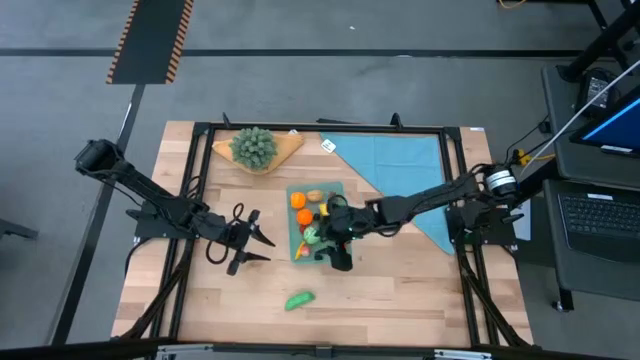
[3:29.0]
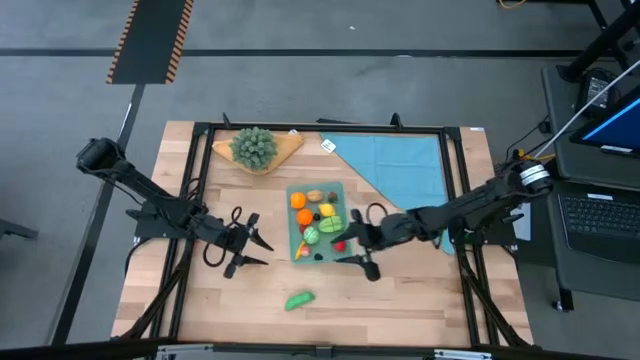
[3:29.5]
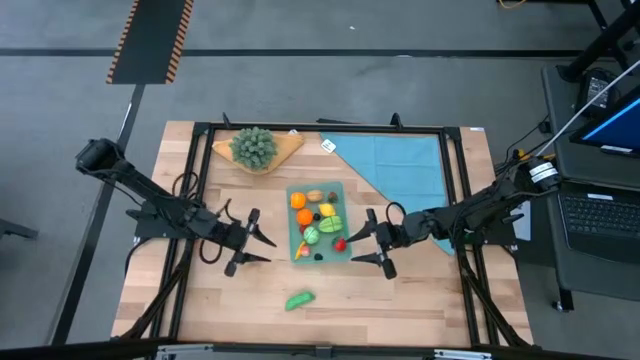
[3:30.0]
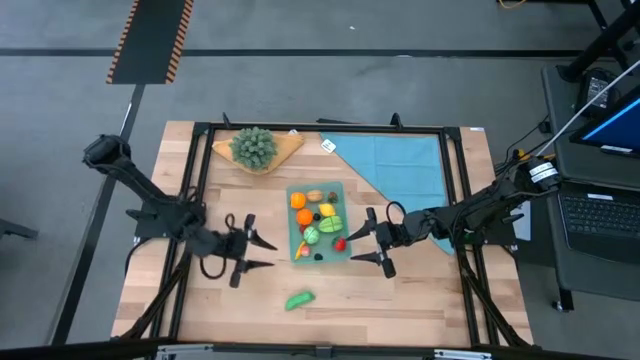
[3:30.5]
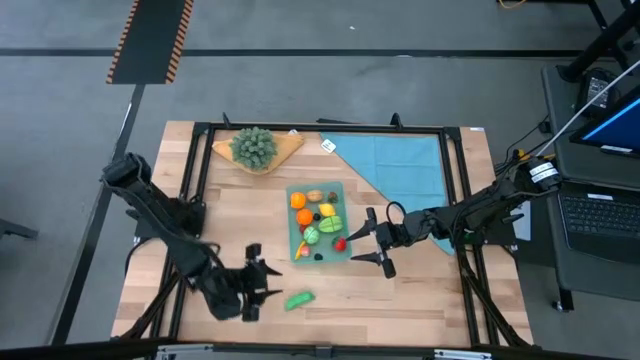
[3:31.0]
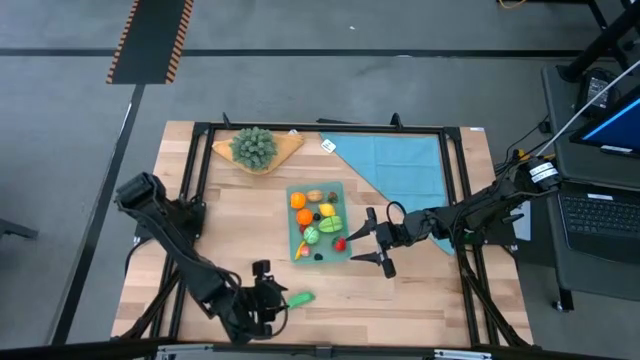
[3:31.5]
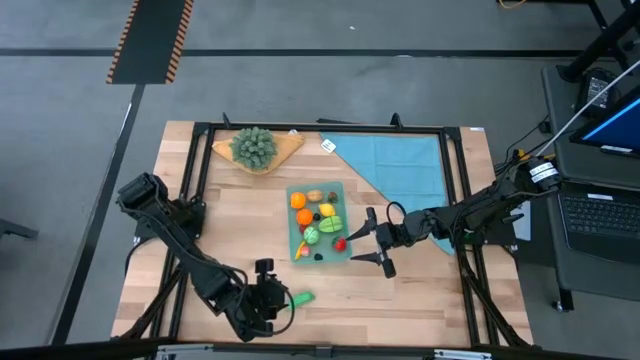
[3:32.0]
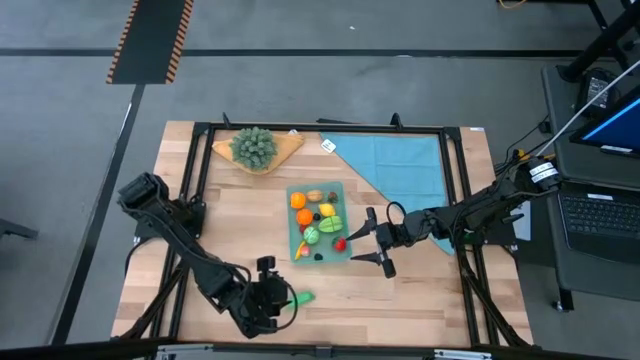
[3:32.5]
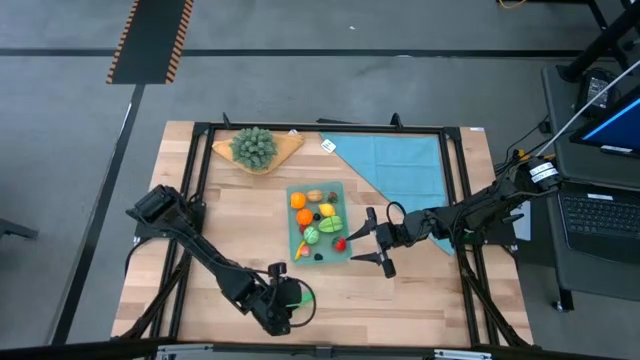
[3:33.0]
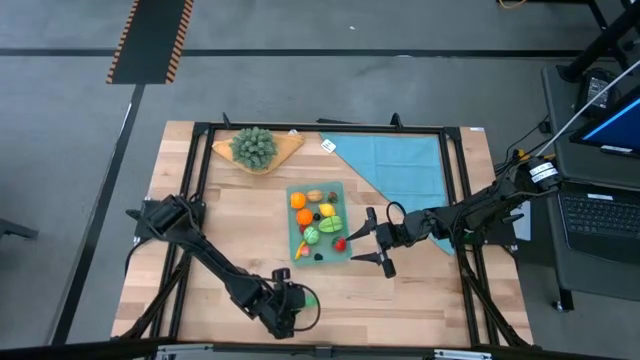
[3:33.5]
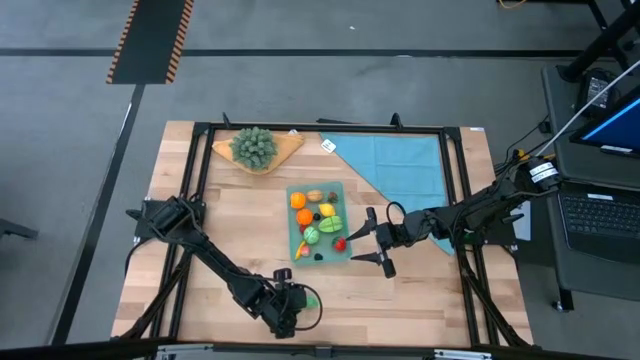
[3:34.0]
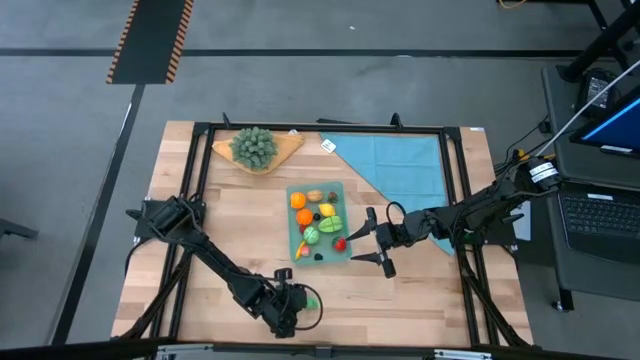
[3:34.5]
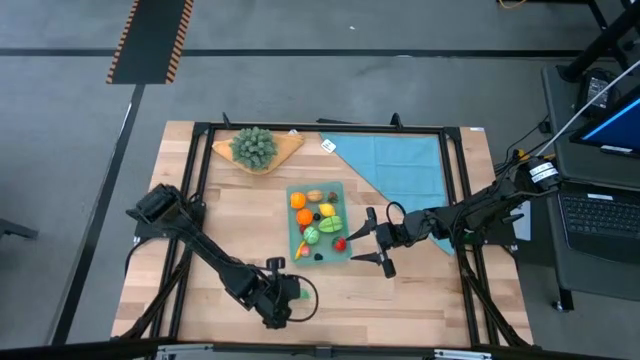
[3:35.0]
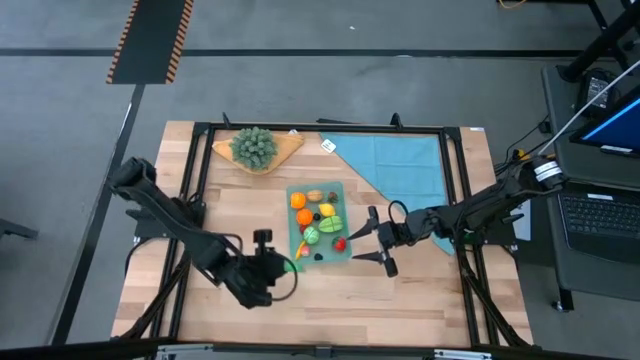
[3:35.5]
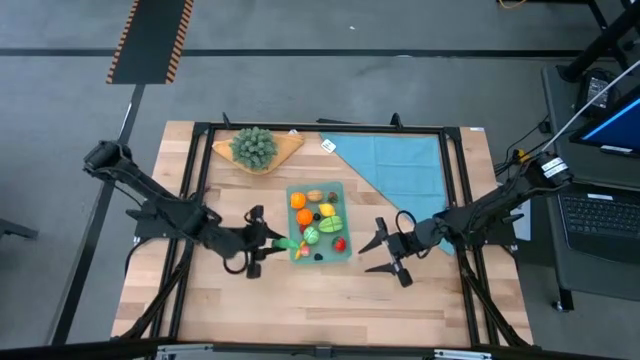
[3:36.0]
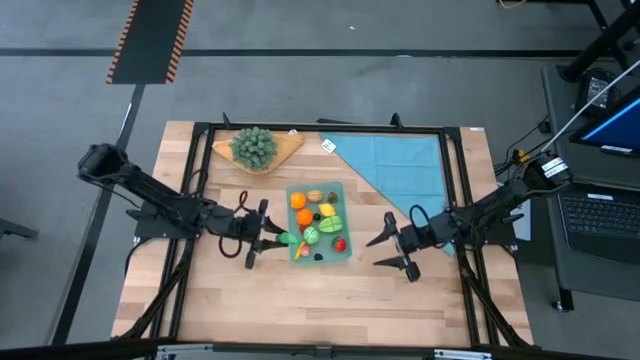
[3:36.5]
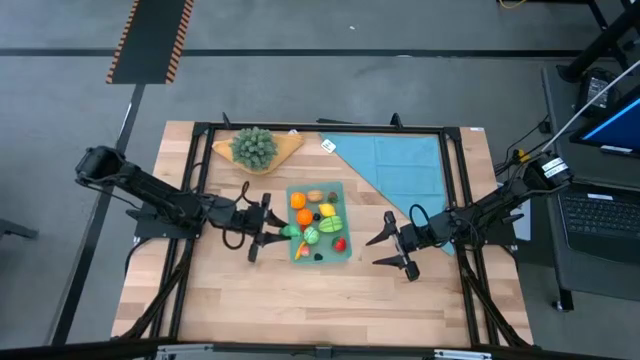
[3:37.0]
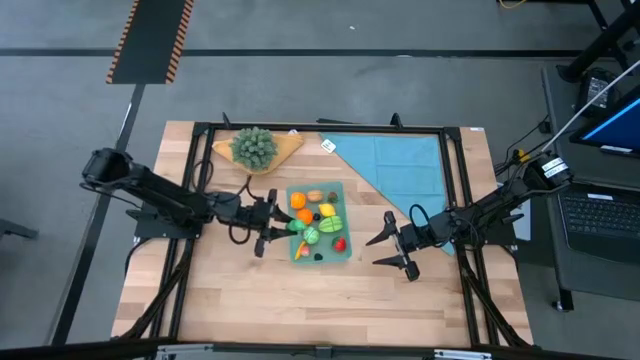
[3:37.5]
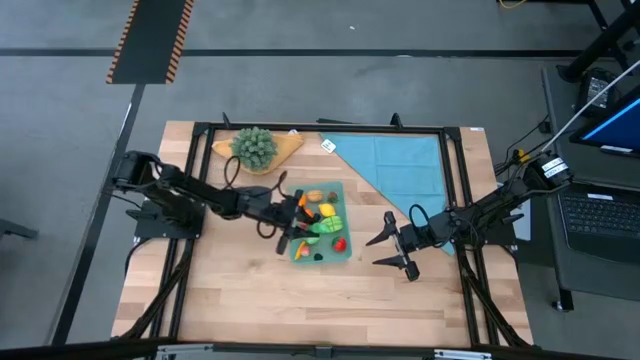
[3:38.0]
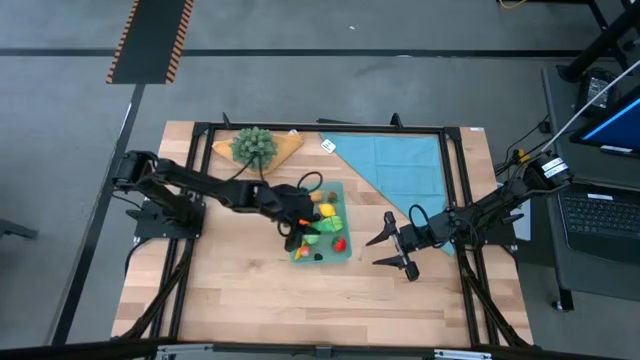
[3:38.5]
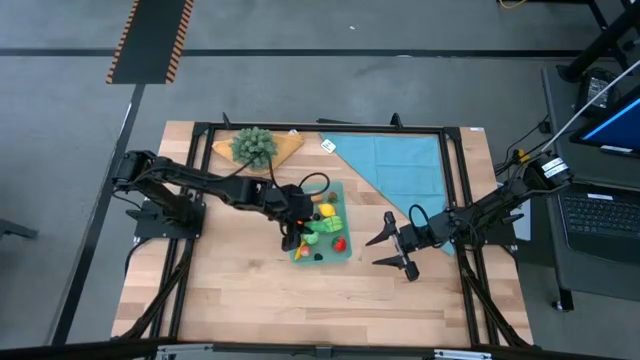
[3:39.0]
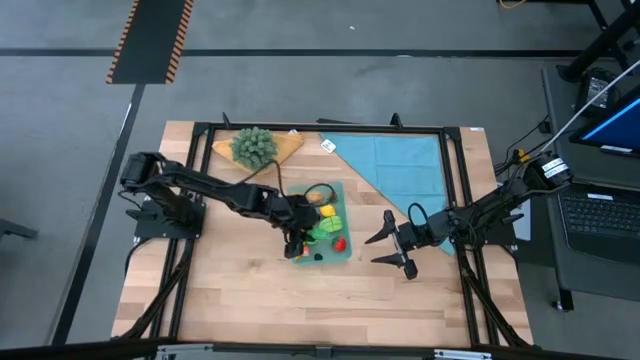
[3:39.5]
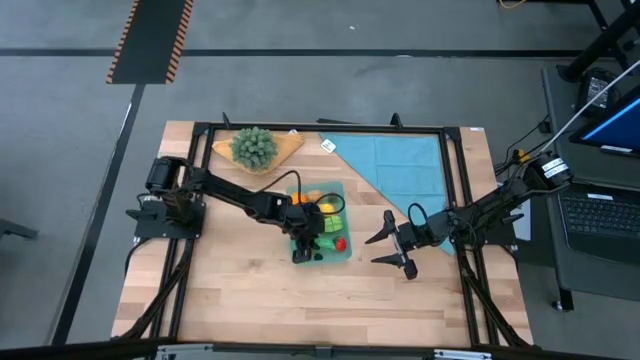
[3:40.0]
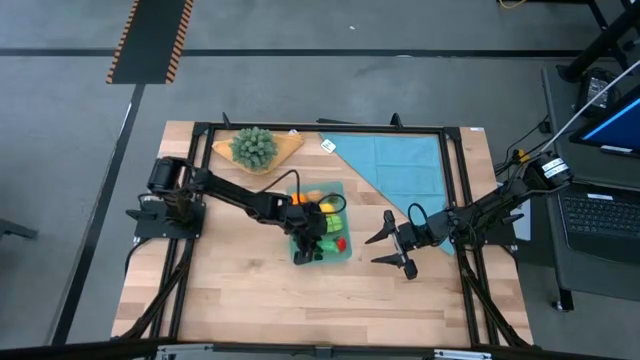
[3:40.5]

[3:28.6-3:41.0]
Task: Pick and placing Produce into tupperware
Put the peas into the bin

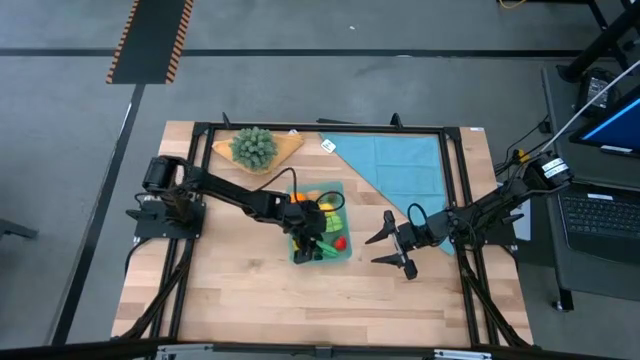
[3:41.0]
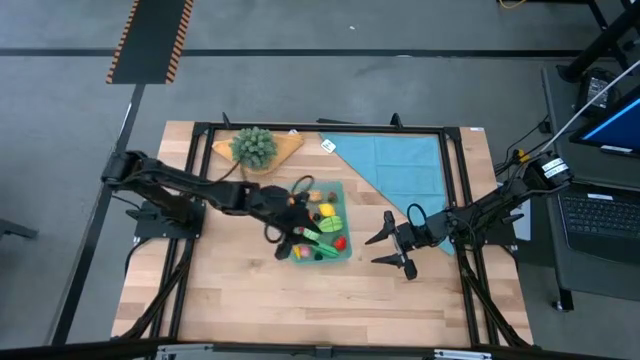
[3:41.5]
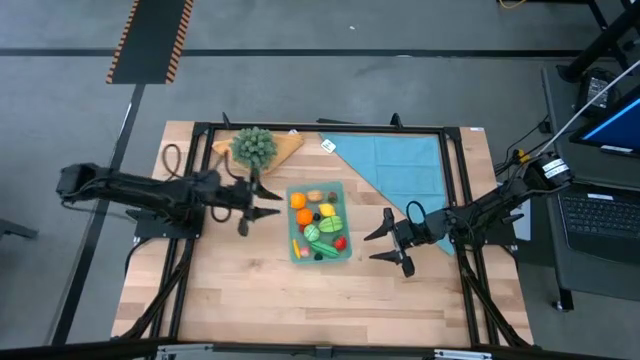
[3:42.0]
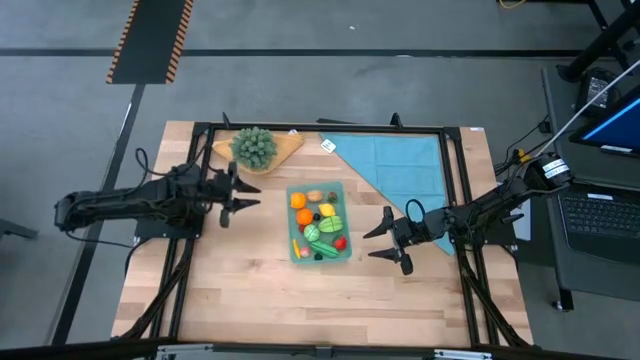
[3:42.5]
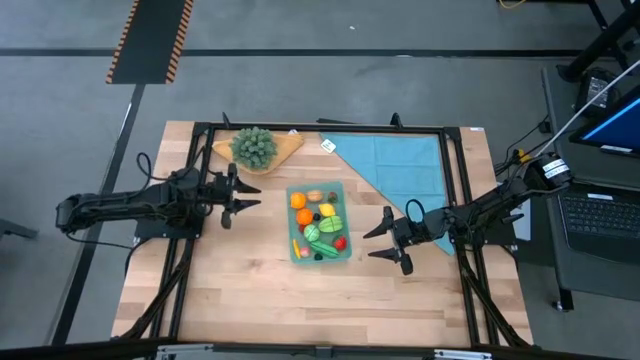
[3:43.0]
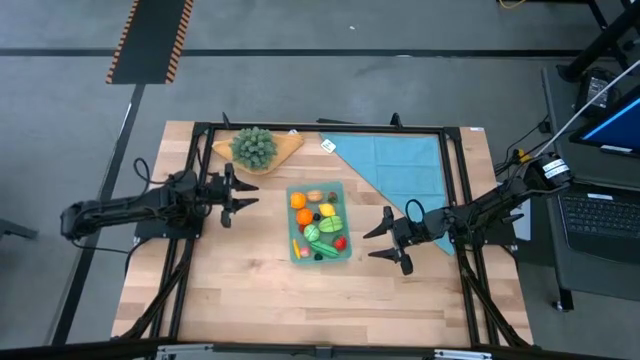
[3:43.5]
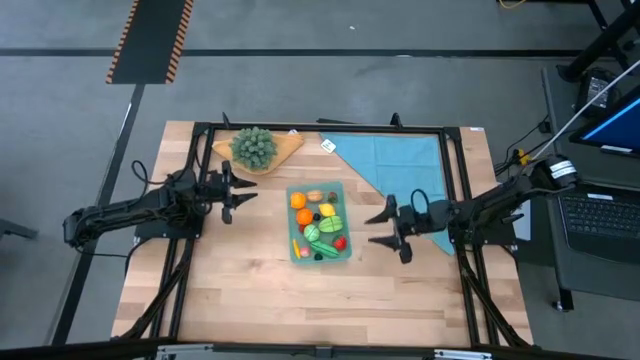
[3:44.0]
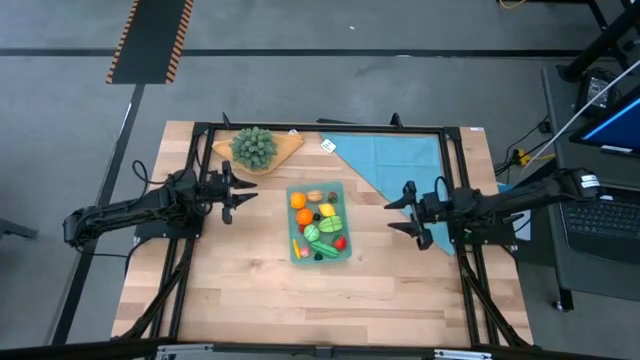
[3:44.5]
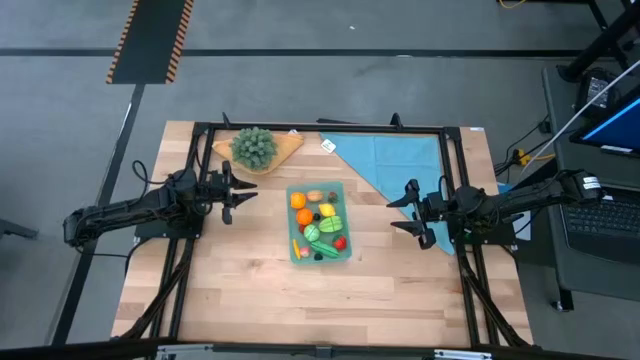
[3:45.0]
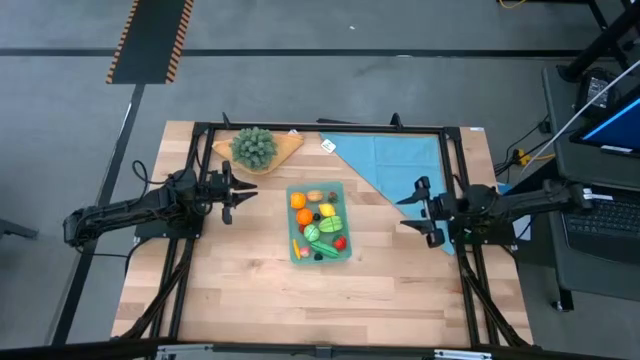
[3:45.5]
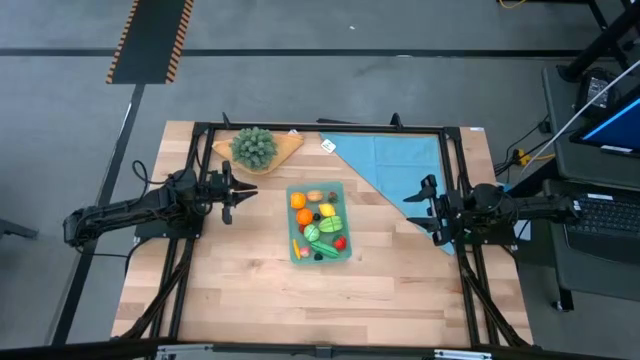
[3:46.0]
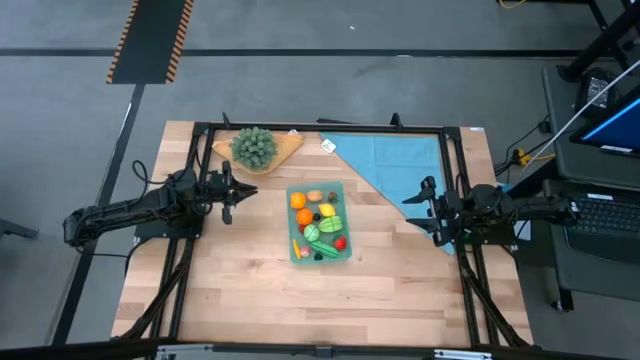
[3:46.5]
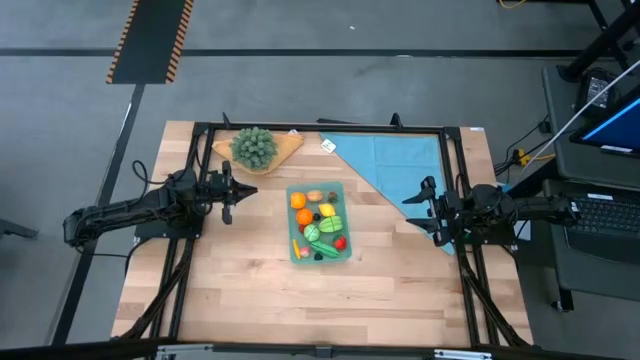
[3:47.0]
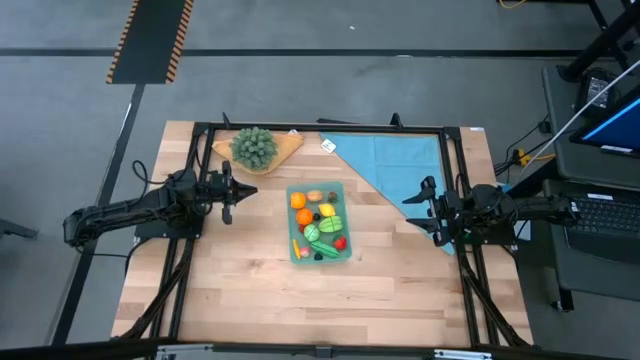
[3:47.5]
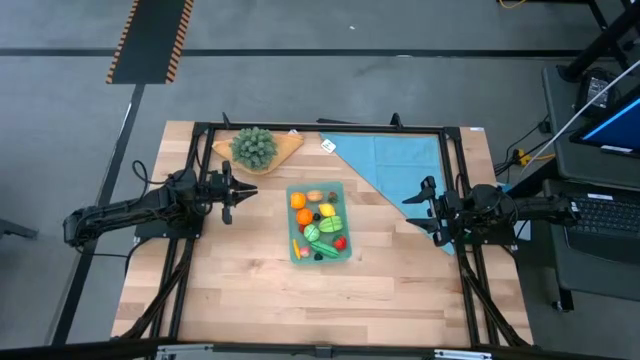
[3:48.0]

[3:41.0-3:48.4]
Return to Home Position

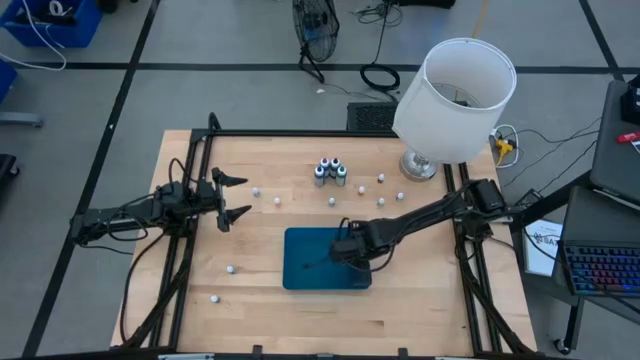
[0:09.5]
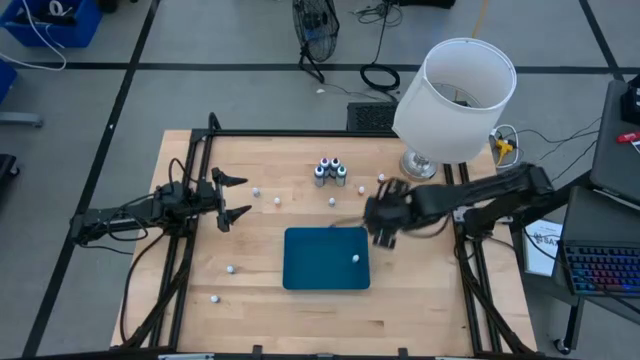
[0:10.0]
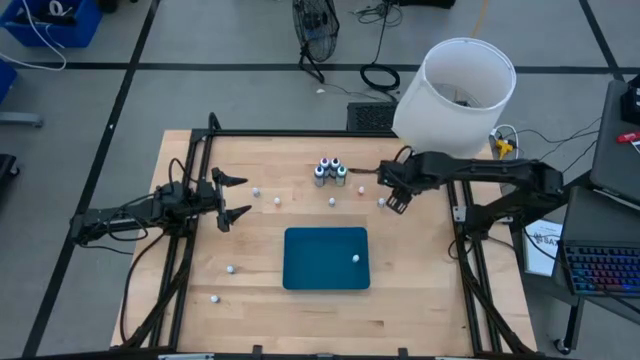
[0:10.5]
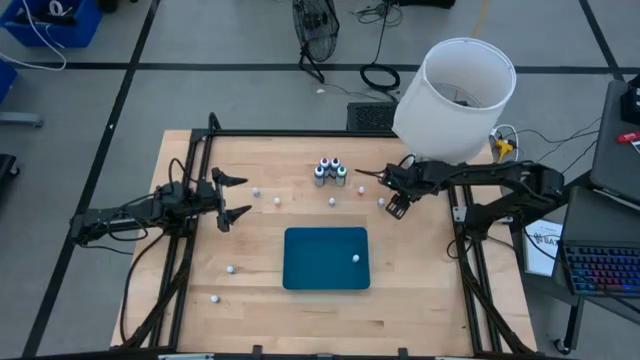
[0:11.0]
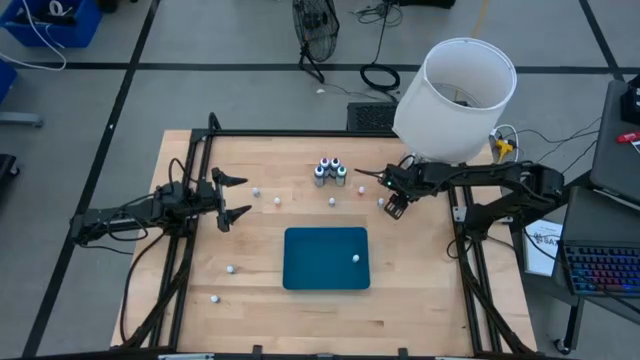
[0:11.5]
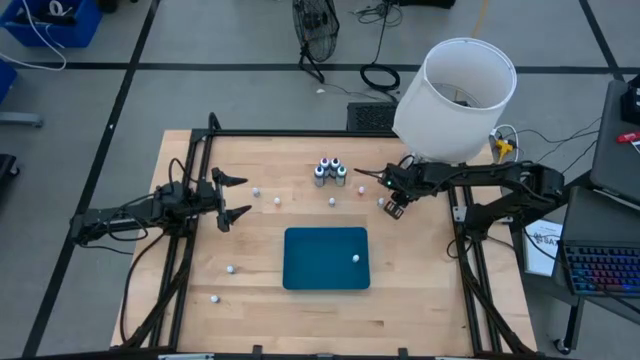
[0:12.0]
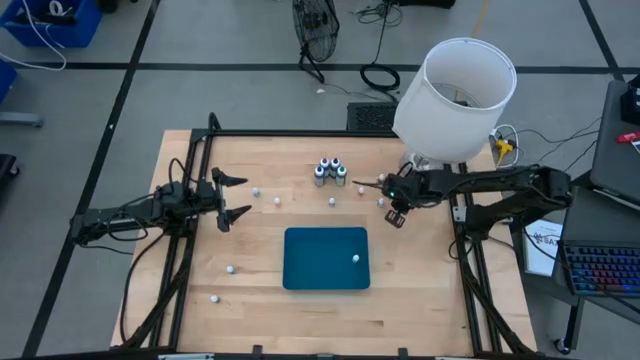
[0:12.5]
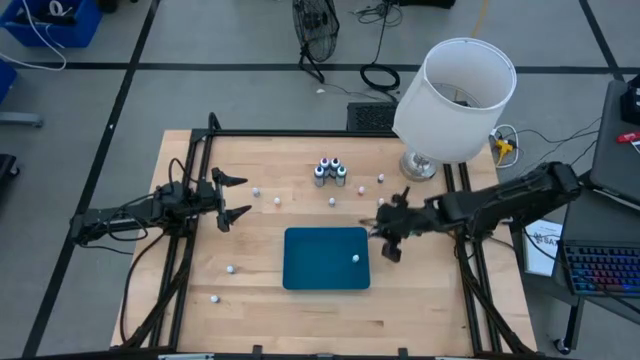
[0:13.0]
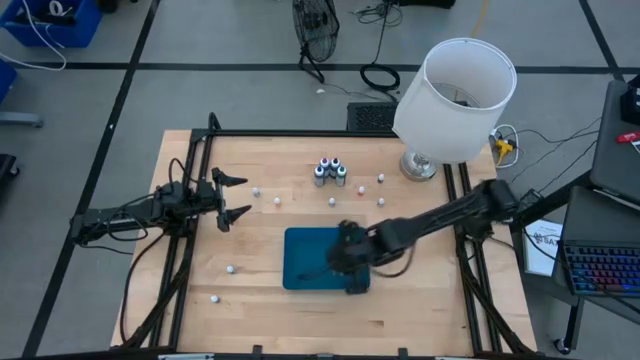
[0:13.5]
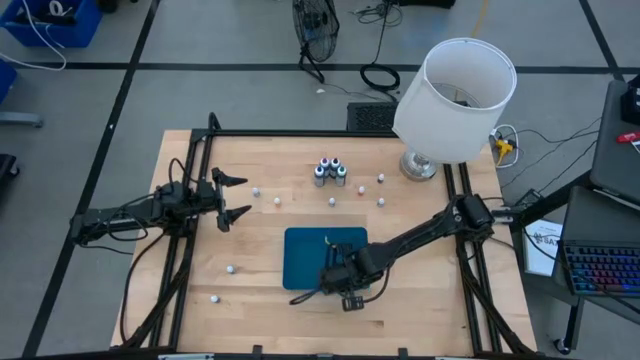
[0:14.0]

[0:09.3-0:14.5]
Task: Pick & Place food coloring
Put the purple food coloring bottle into the bin
